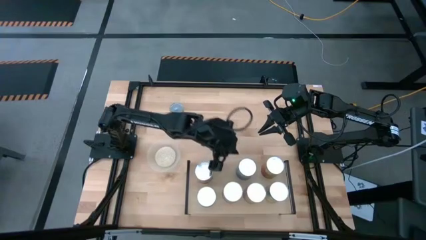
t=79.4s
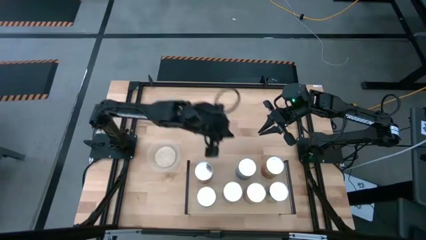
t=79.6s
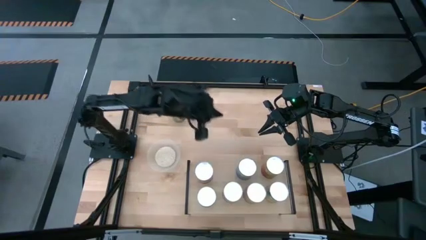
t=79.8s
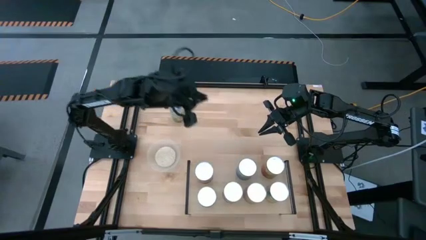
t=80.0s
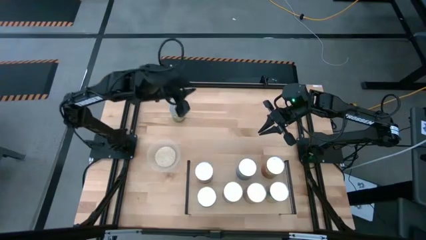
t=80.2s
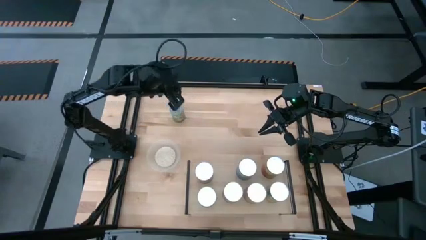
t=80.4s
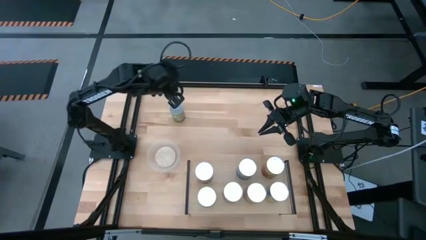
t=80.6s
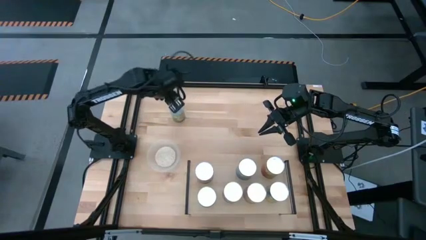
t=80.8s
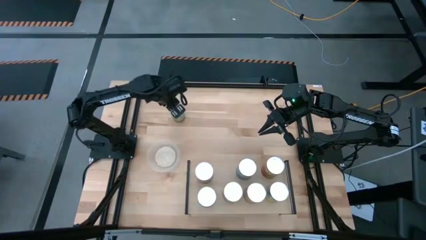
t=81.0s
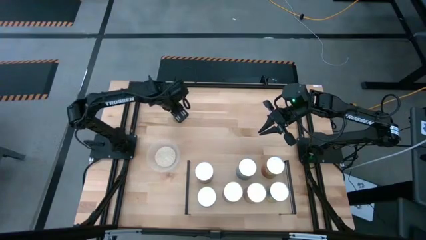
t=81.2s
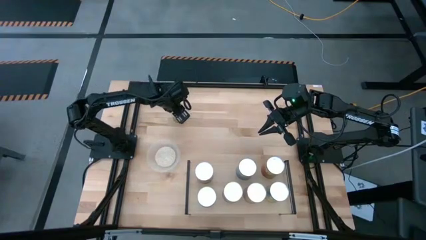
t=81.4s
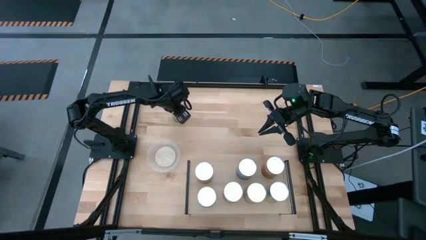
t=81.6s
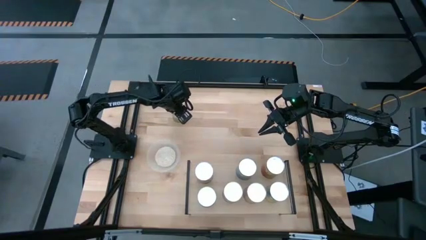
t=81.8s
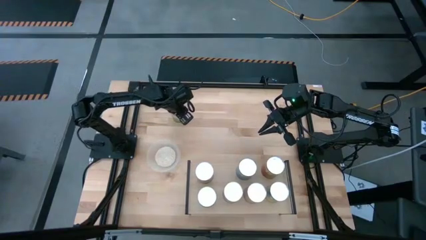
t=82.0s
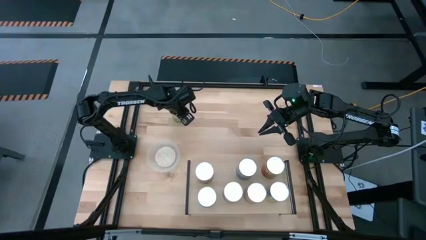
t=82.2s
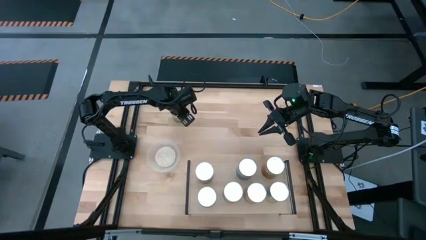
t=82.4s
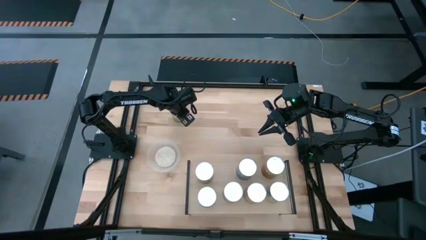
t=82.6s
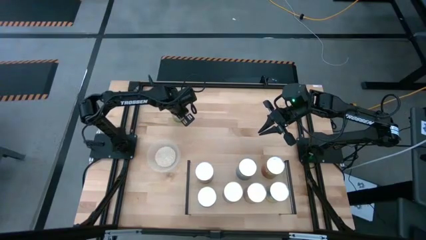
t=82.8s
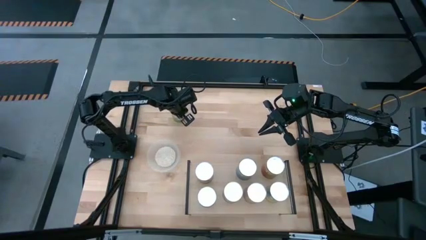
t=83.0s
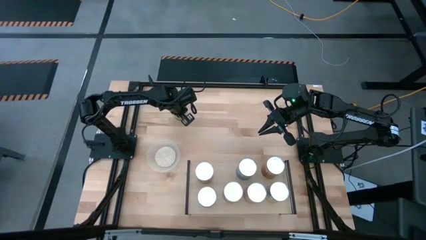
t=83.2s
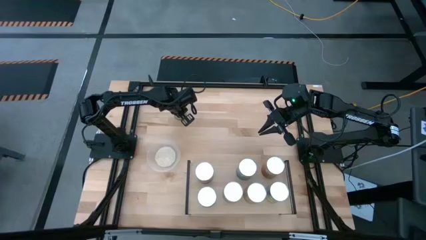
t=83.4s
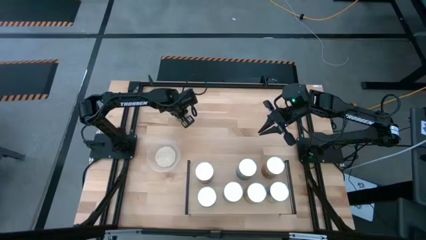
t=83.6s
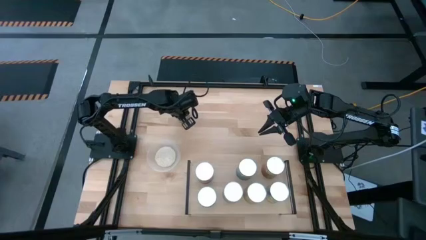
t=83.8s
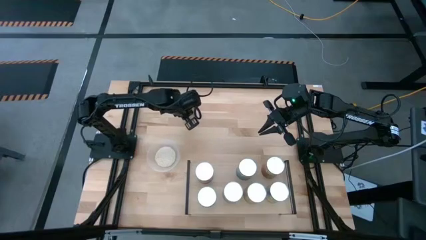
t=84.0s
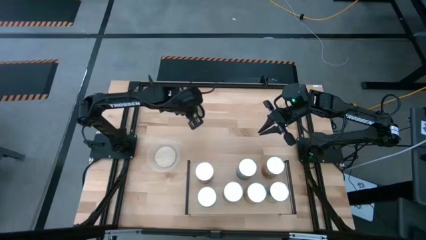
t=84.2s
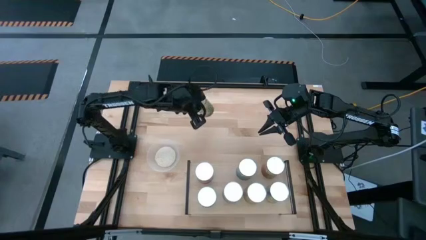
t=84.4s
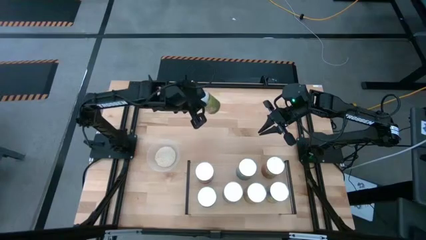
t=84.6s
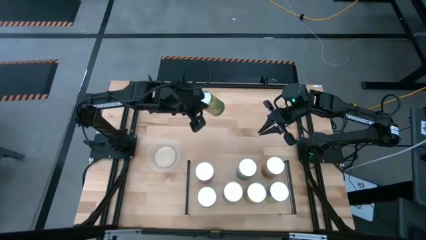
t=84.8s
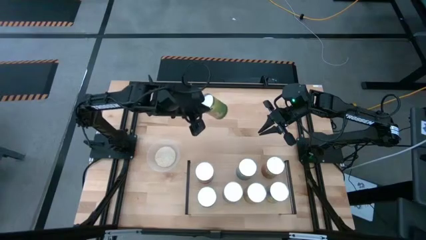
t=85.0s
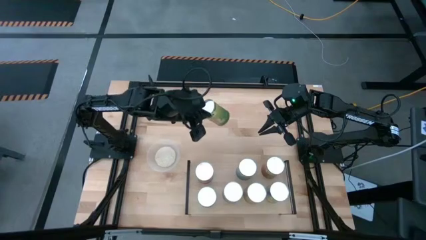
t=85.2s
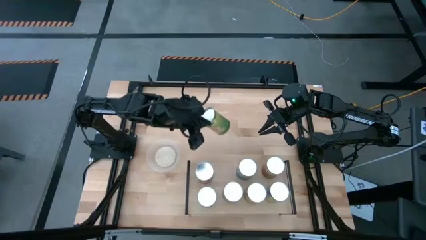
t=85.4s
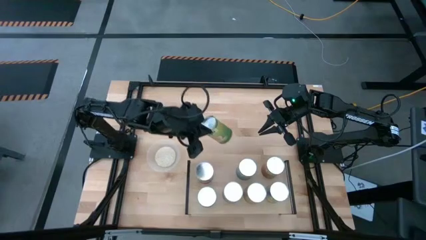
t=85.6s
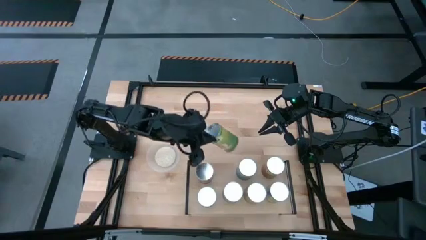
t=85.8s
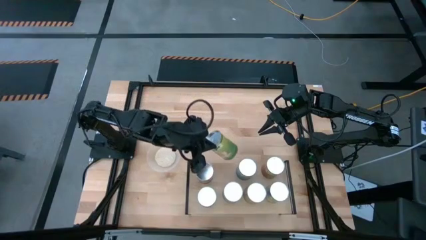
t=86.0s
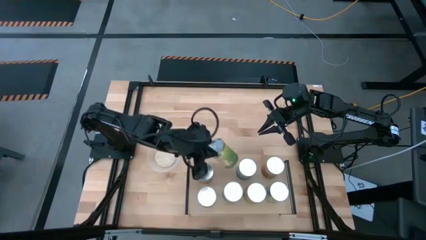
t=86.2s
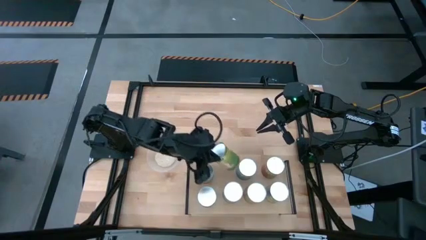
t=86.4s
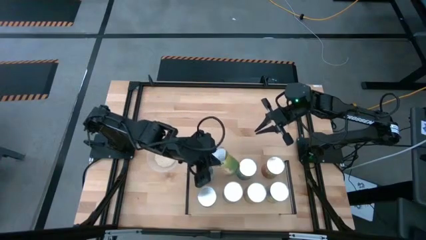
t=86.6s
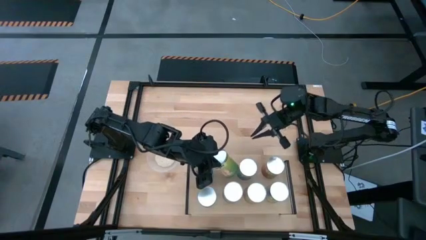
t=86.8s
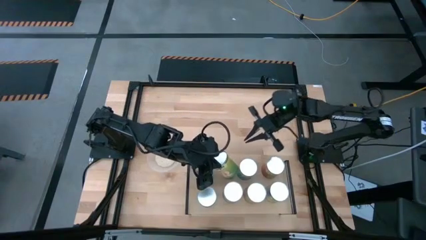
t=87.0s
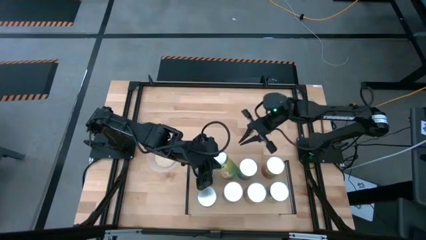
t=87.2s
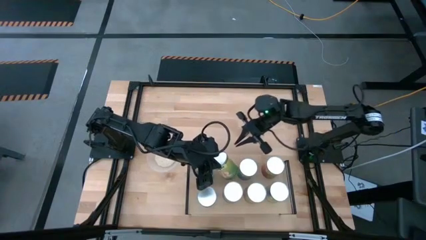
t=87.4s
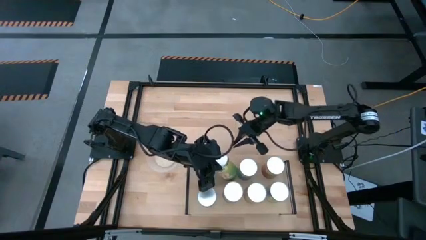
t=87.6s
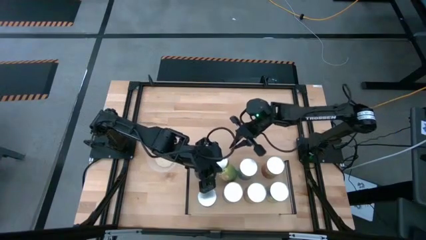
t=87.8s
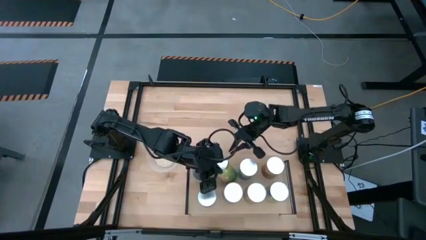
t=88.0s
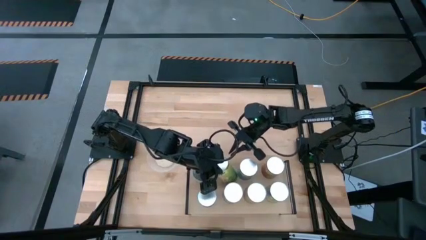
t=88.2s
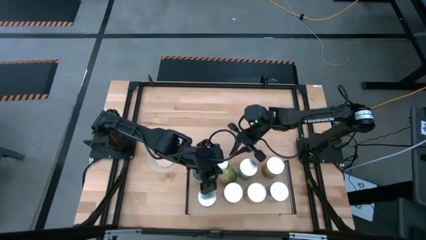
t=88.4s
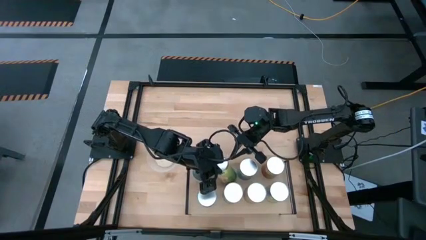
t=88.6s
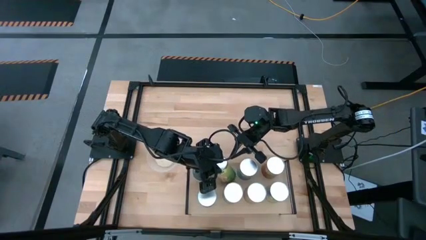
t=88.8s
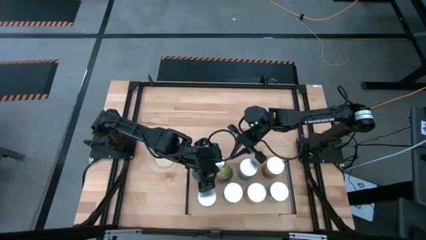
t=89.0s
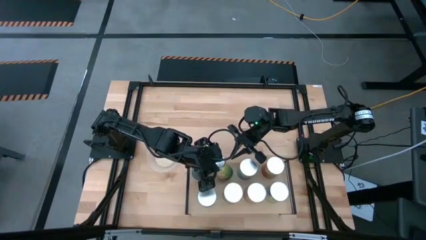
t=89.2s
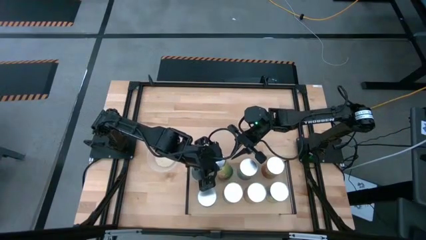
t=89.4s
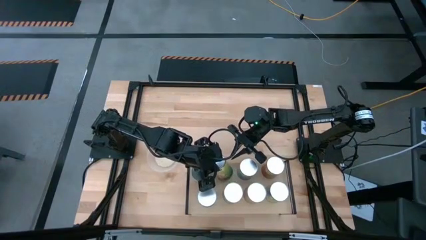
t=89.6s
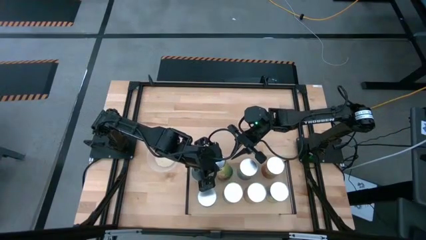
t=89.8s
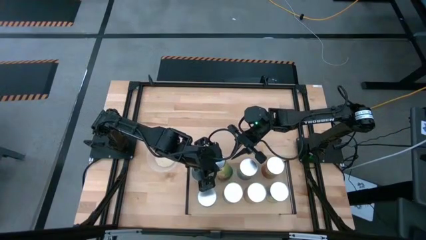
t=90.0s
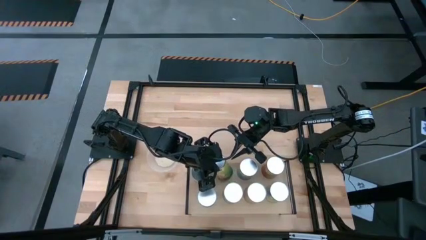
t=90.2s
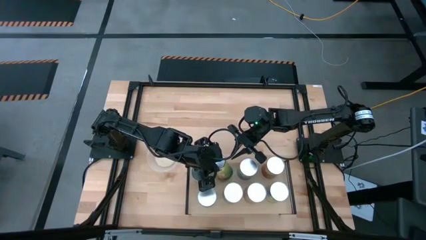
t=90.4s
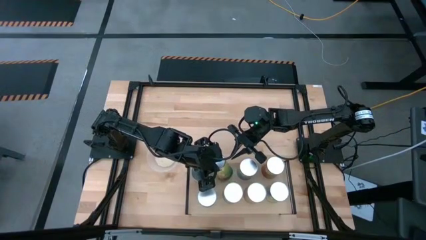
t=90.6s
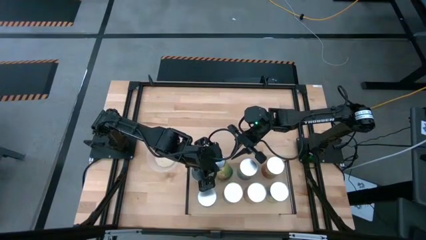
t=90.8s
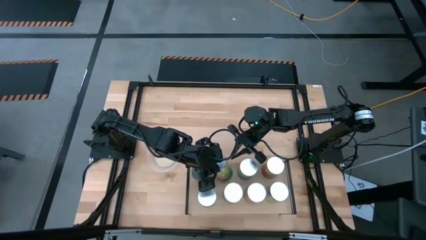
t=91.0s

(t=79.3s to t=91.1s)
Task: Pick and place cans onto a shelf
Put the canned oranges on the shelf

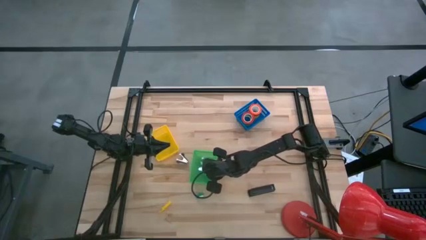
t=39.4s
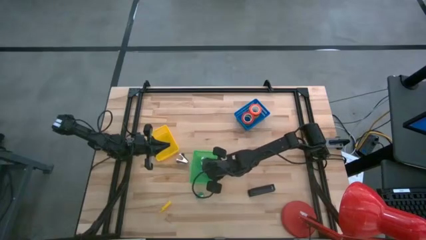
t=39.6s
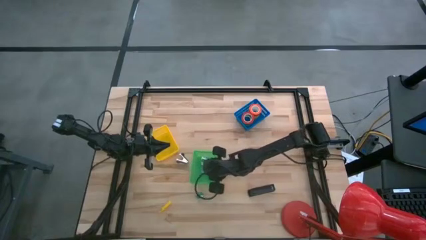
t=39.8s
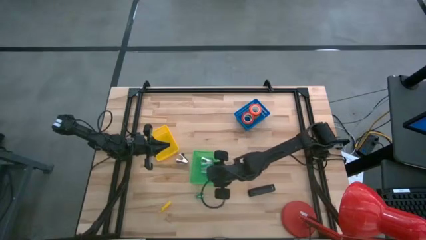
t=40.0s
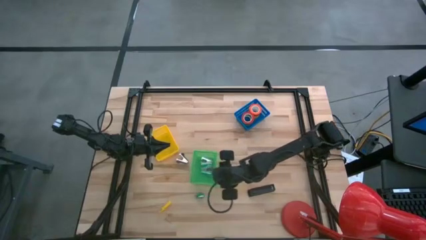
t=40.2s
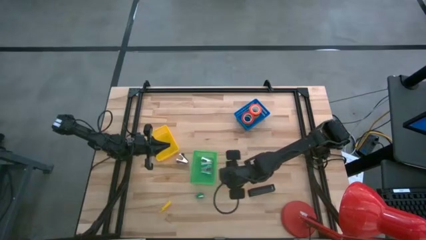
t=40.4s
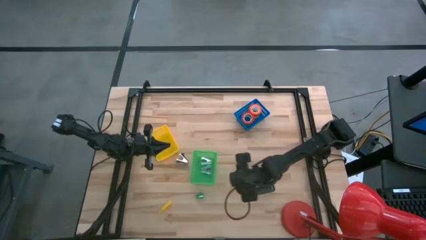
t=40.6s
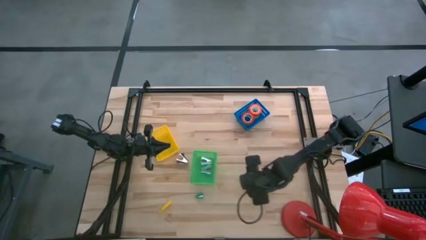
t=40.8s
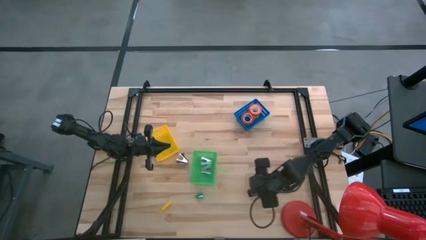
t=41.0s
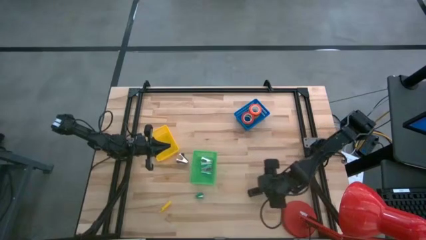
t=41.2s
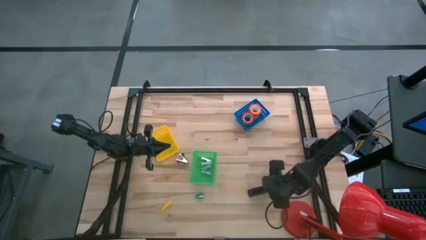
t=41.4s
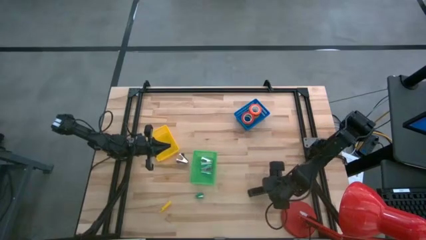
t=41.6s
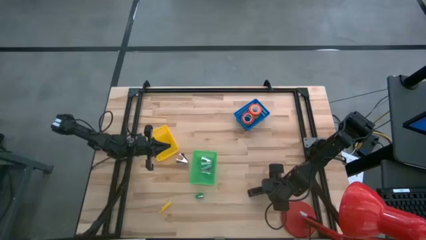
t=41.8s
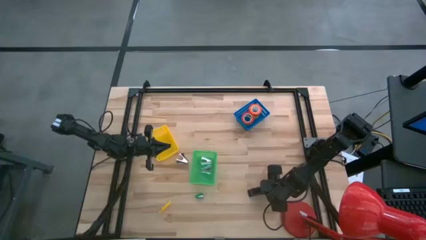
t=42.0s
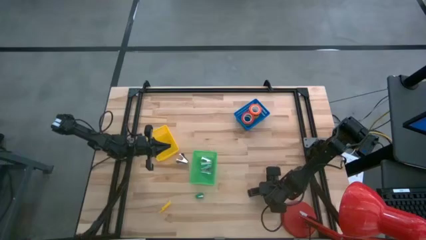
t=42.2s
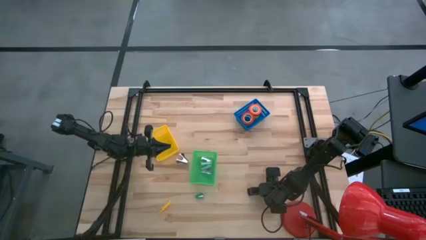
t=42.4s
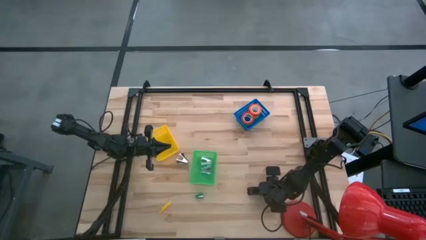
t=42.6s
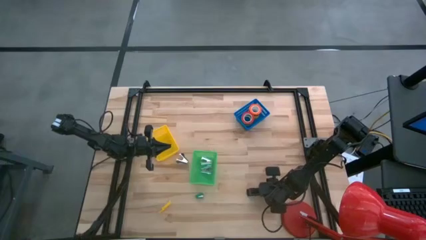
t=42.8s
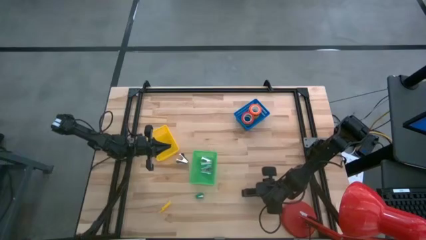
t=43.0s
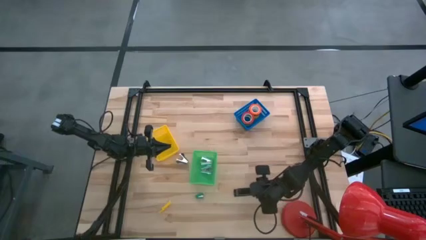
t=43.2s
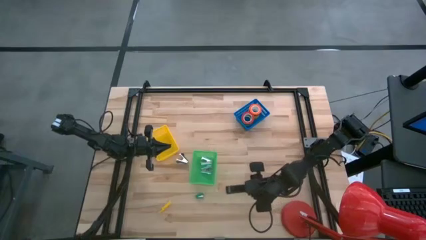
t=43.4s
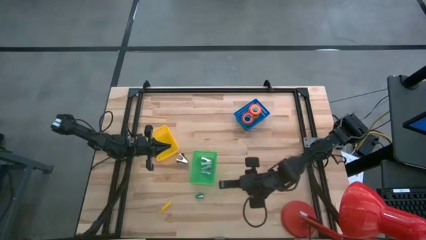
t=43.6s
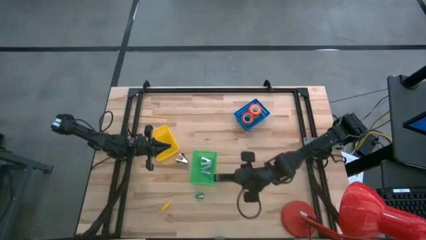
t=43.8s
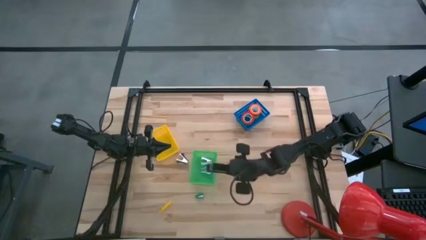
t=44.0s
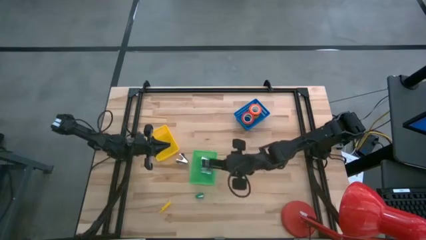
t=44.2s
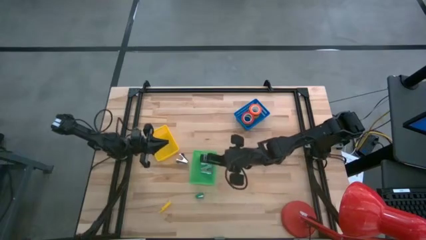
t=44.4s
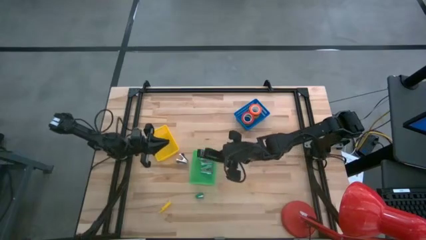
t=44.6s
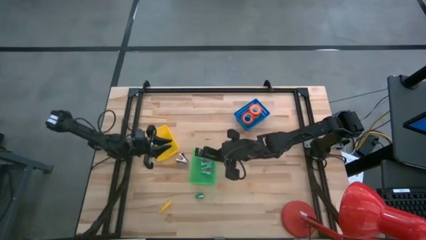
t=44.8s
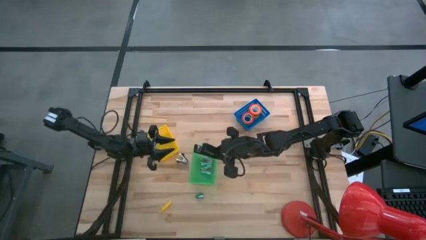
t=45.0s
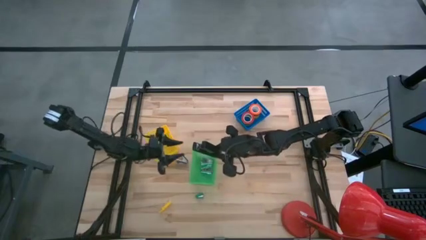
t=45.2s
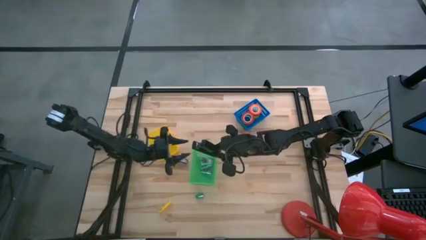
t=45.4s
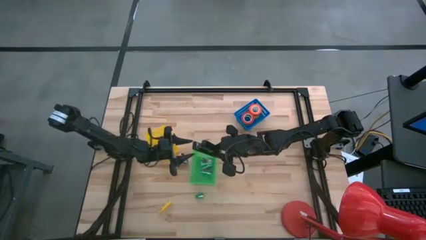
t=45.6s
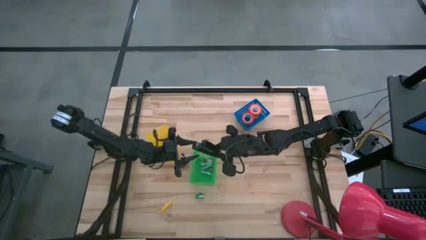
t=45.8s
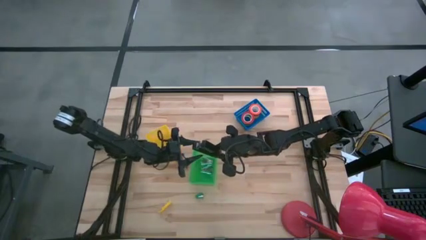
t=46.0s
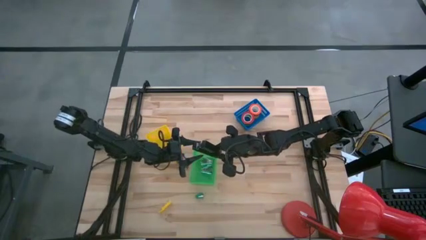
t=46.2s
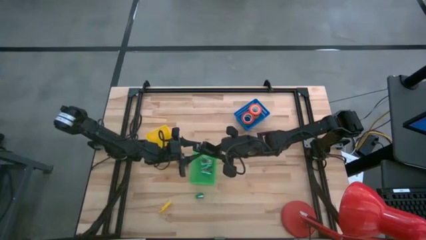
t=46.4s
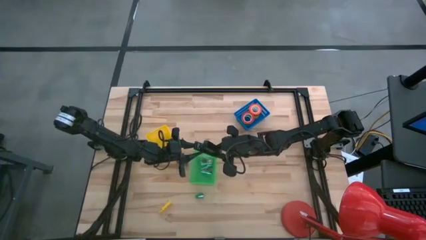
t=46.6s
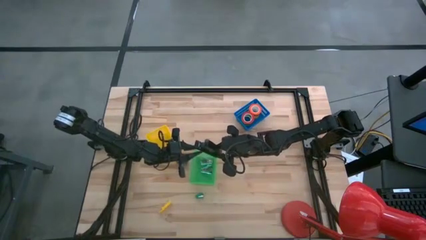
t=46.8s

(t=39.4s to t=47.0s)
Task: Pick and place Stapler, Stapler remover, tape
Put the black stapler into the yellow bin
